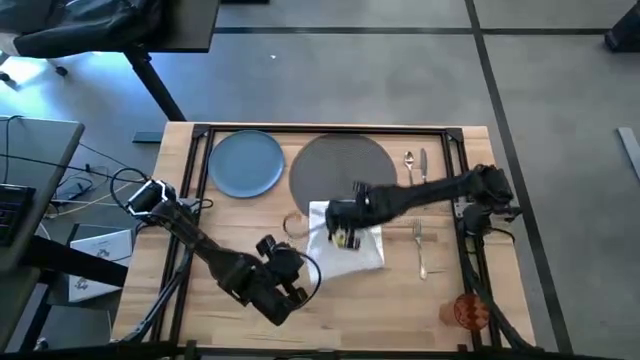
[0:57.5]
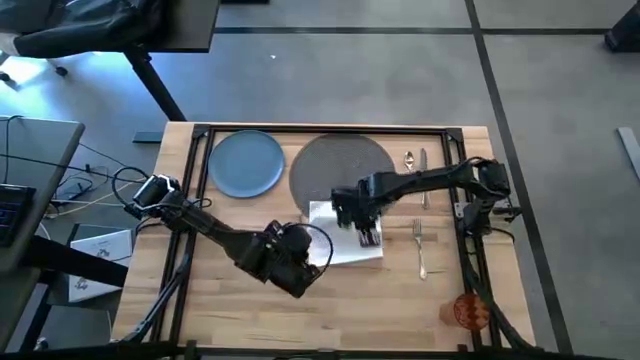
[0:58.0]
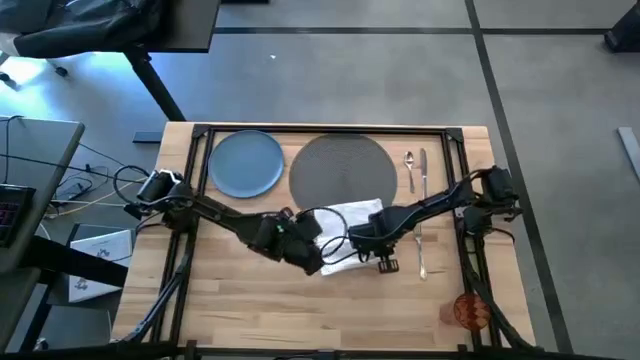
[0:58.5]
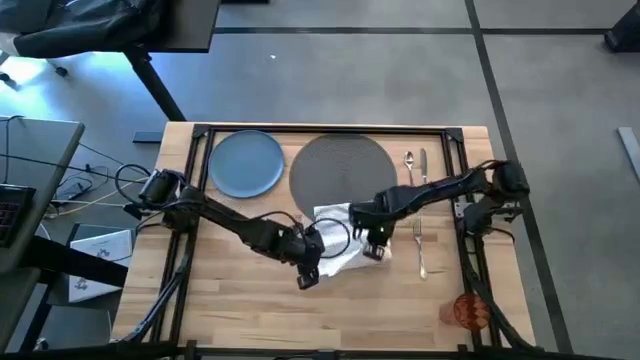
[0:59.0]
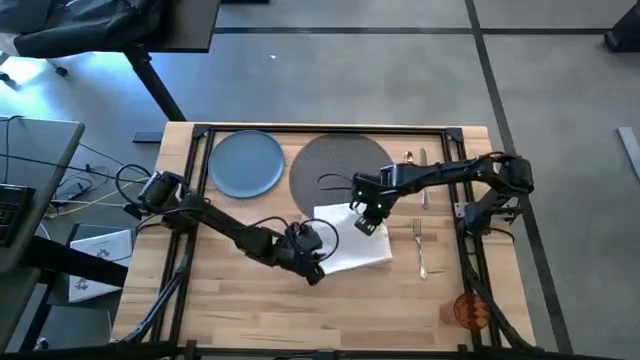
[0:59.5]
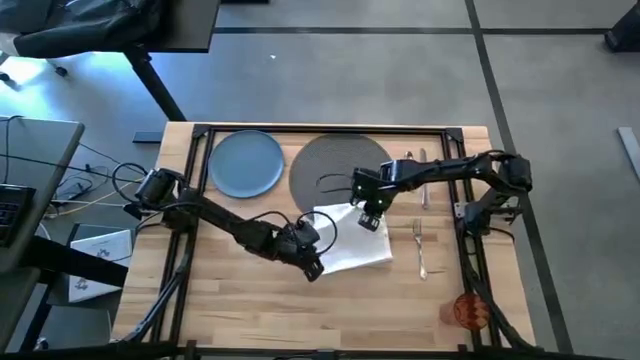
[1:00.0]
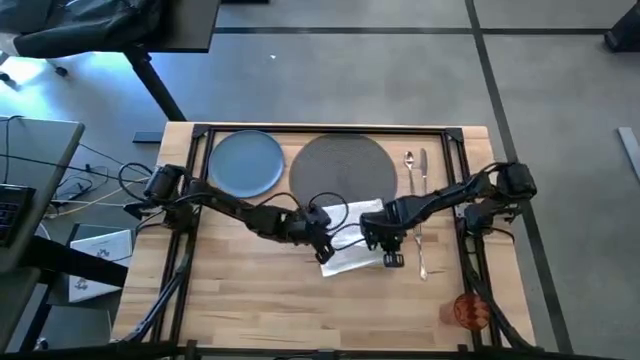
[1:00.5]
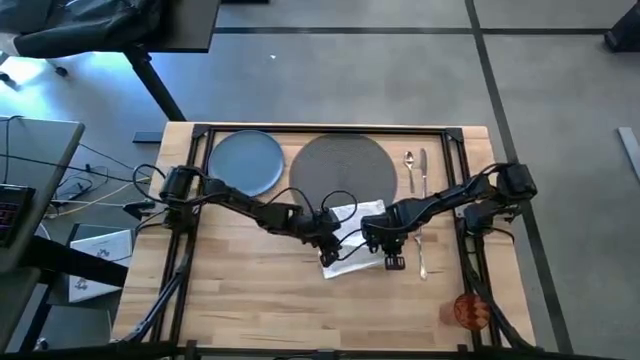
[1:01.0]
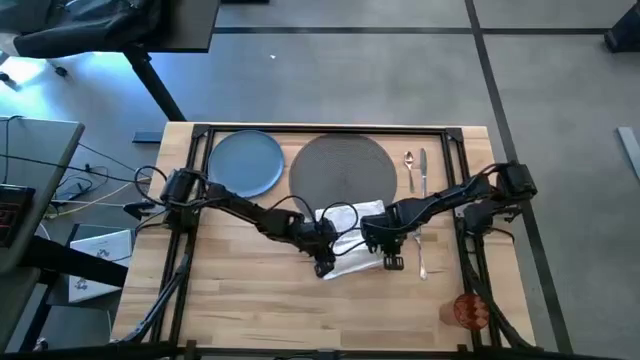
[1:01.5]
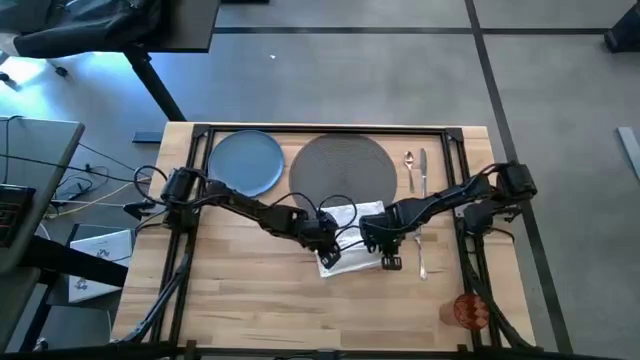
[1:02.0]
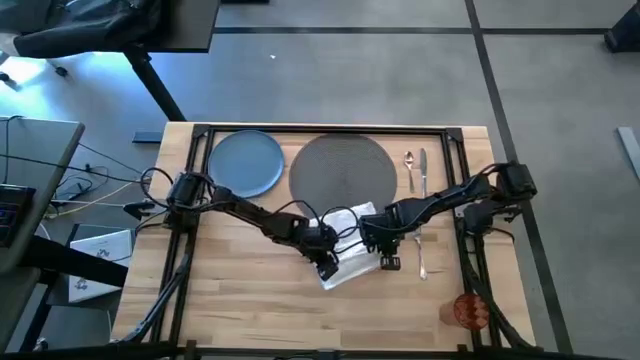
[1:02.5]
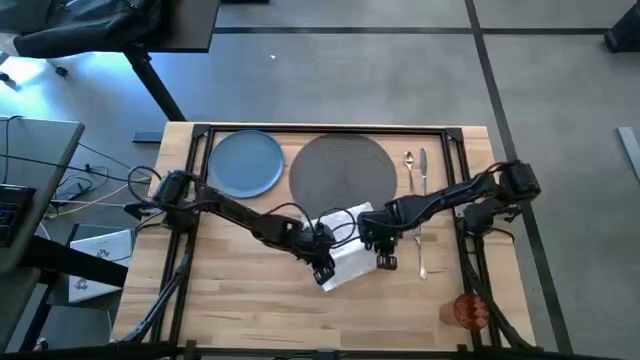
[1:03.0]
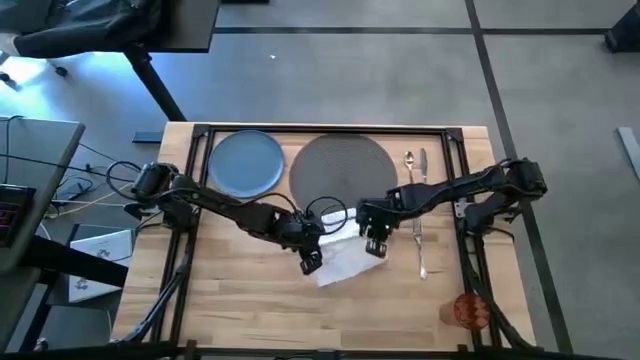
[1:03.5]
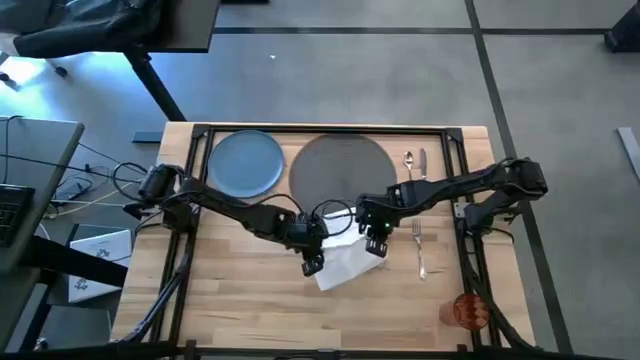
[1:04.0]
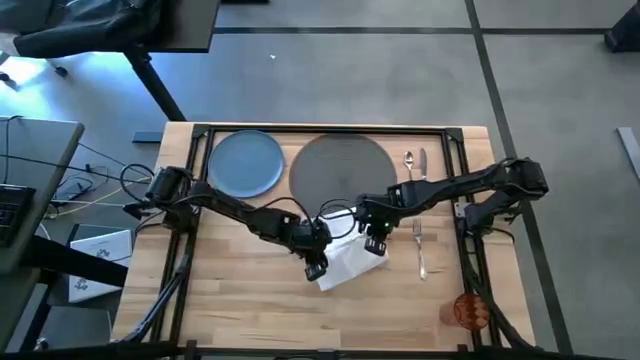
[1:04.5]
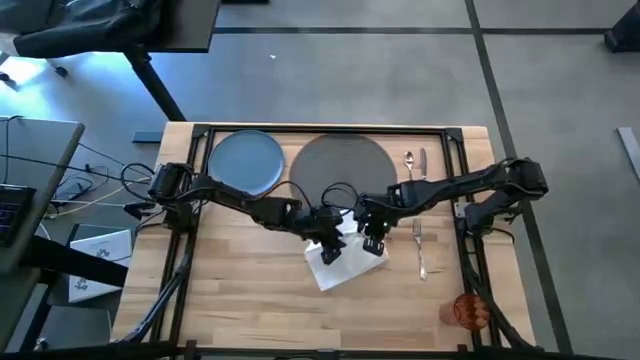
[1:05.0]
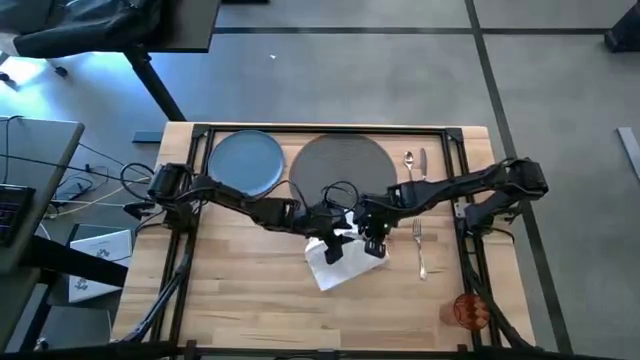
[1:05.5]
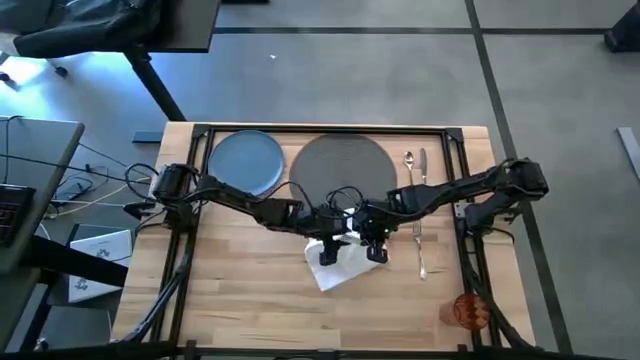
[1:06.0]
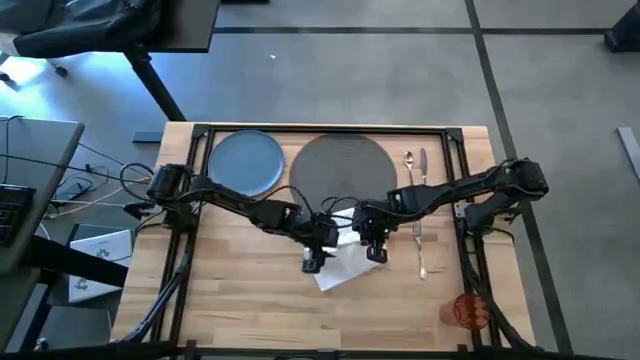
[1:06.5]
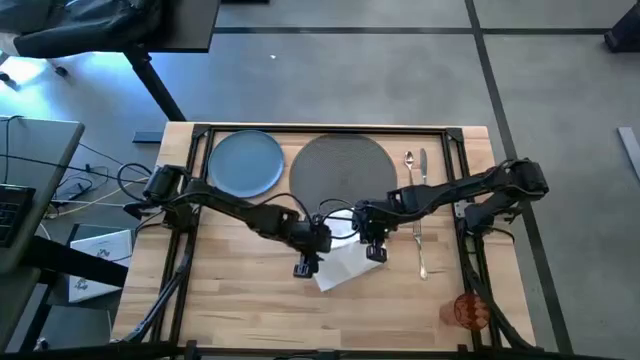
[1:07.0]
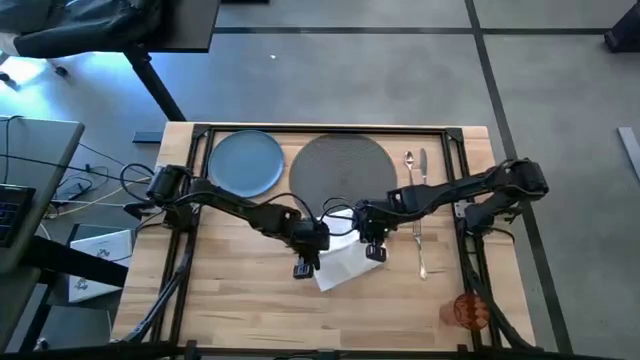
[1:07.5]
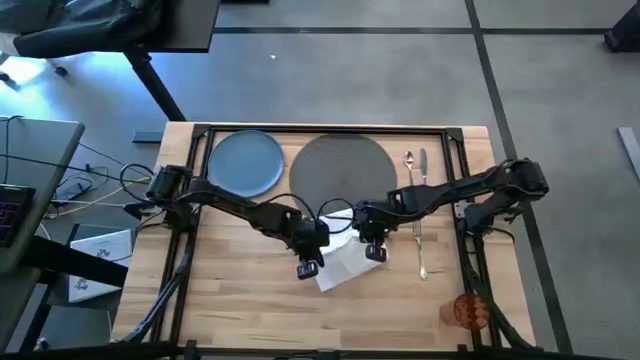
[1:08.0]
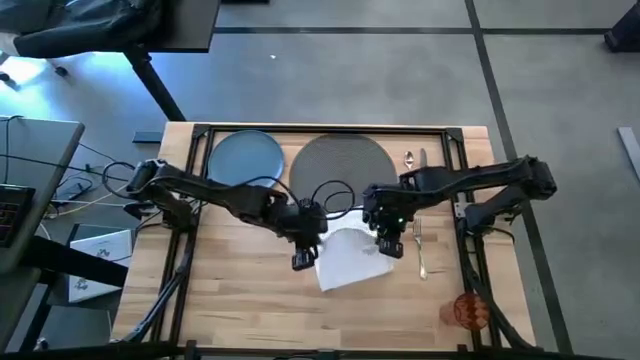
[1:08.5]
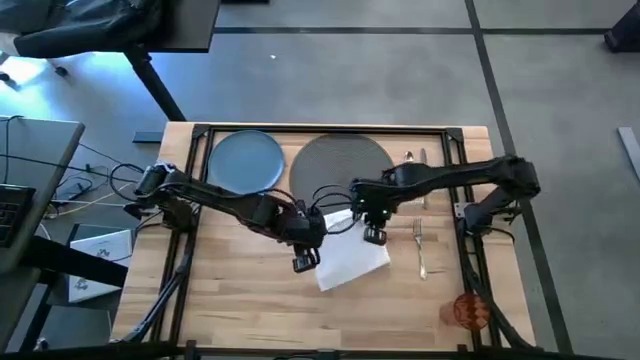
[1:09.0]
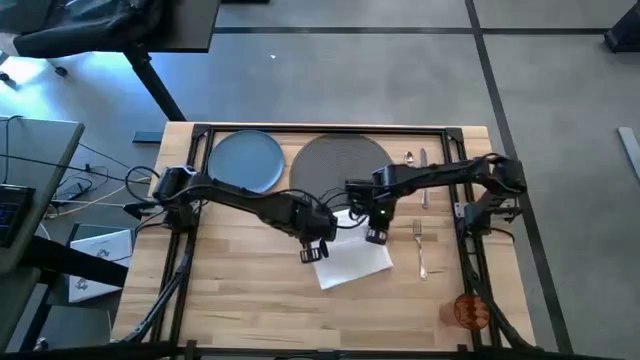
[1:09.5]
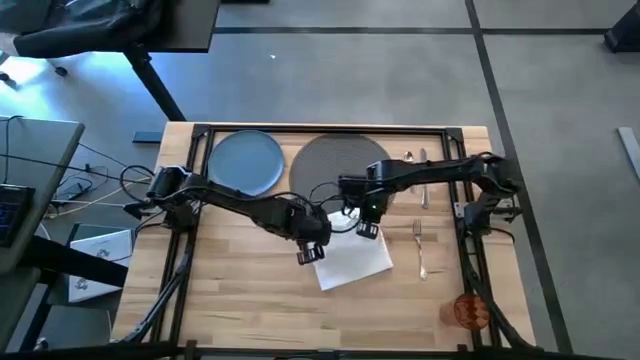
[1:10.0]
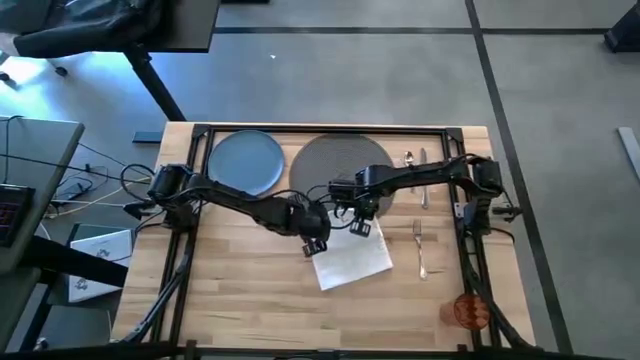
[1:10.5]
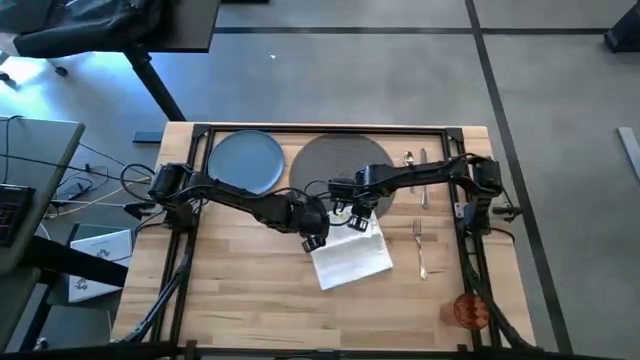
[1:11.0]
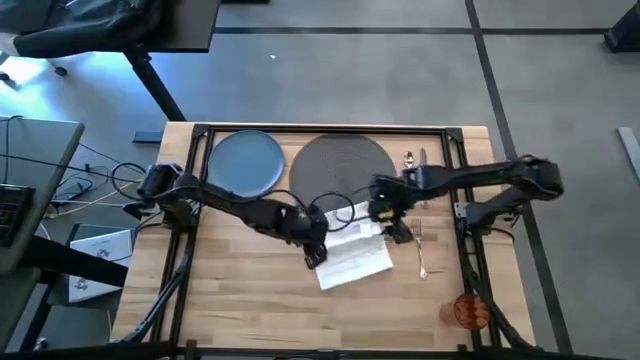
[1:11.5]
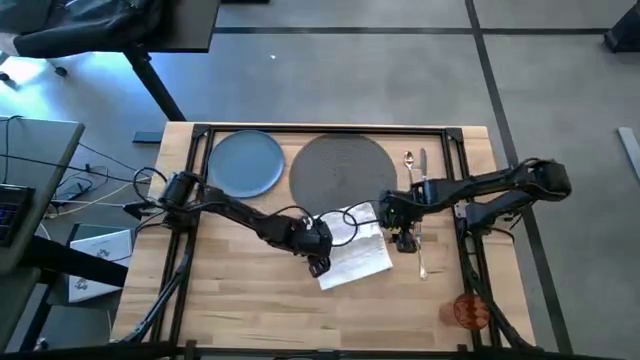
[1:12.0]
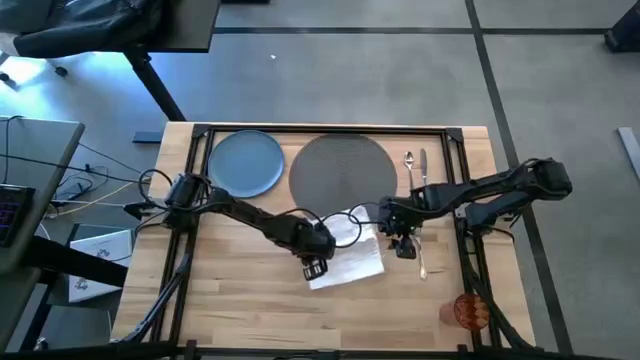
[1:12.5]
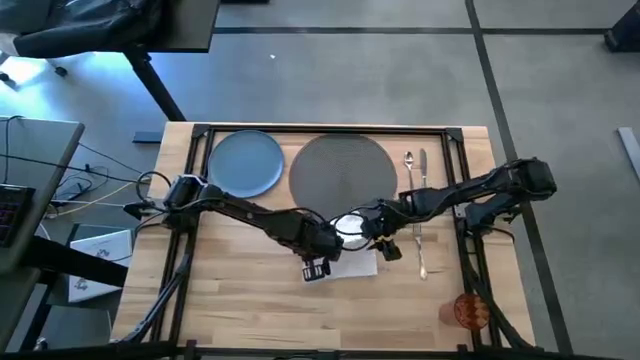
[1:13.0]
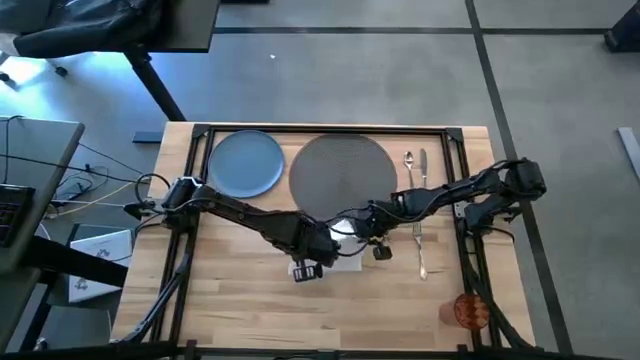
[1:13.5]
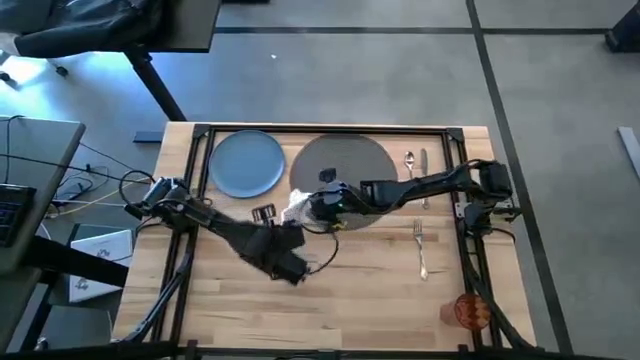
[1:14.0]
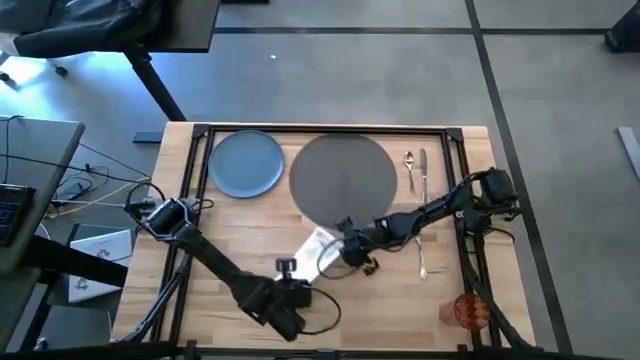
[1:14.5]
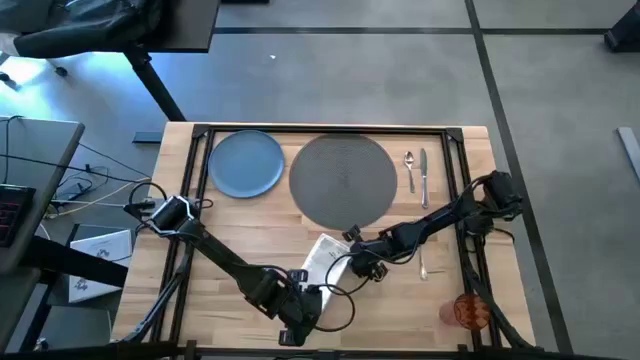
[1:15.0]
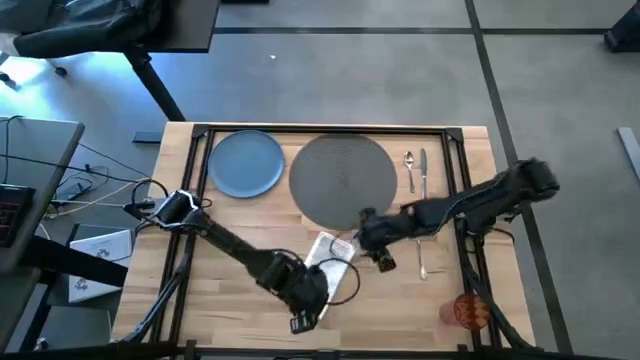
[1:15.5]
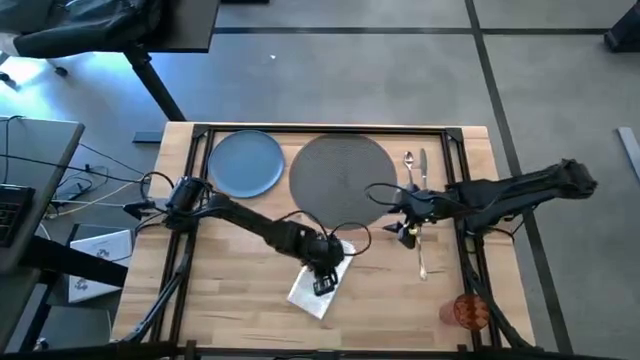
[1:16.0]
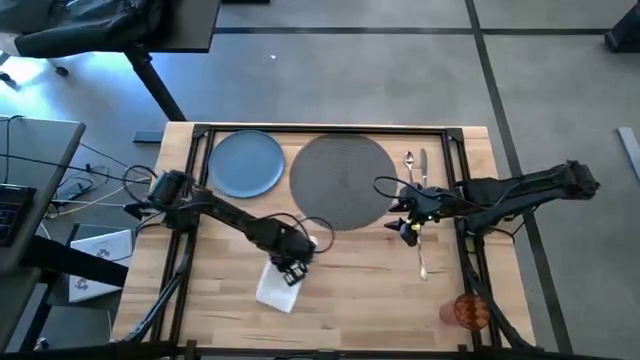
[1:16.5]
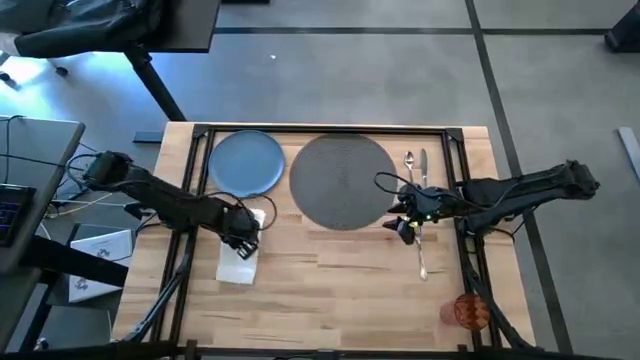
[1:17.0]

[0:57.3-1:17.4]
Task: Set table place
Fold the white table napkin

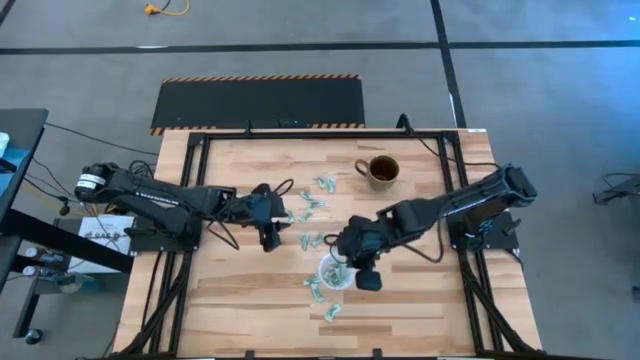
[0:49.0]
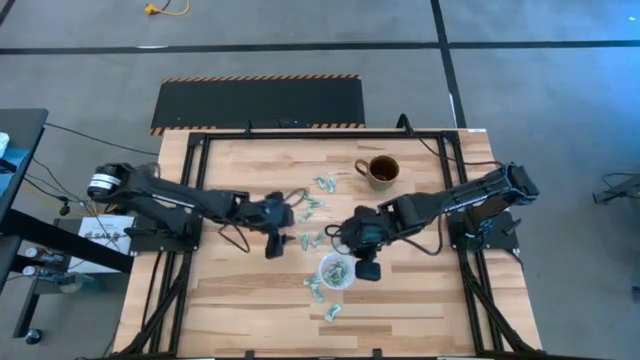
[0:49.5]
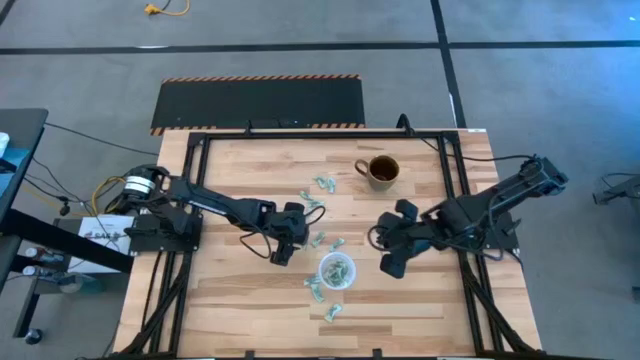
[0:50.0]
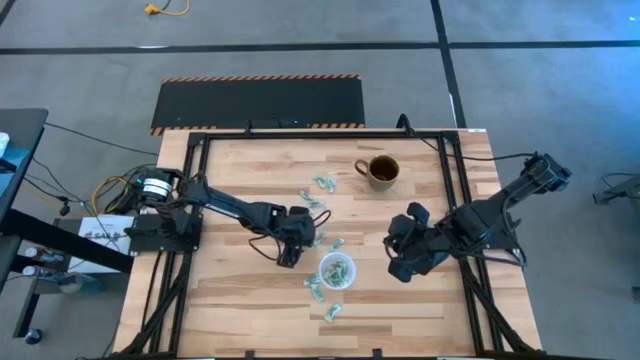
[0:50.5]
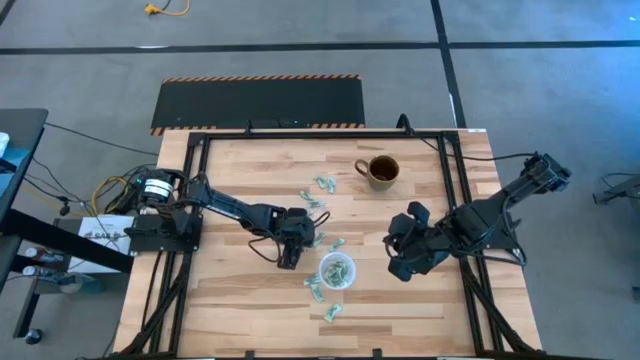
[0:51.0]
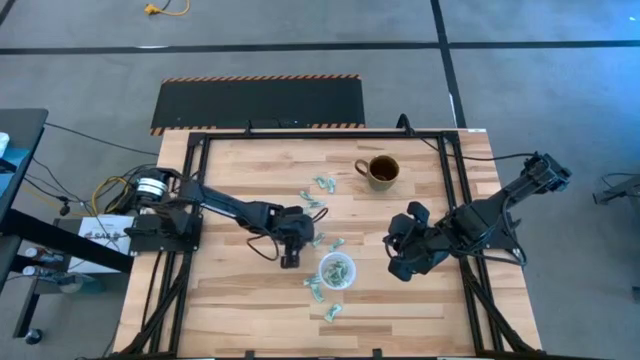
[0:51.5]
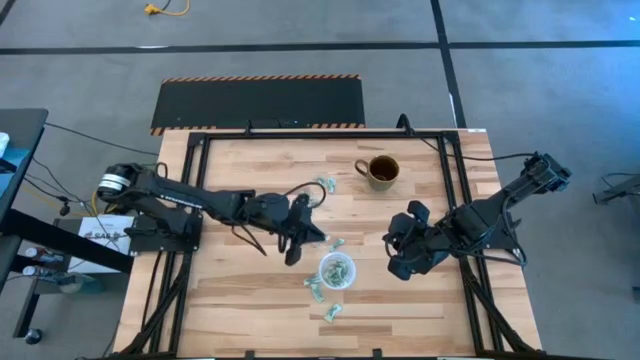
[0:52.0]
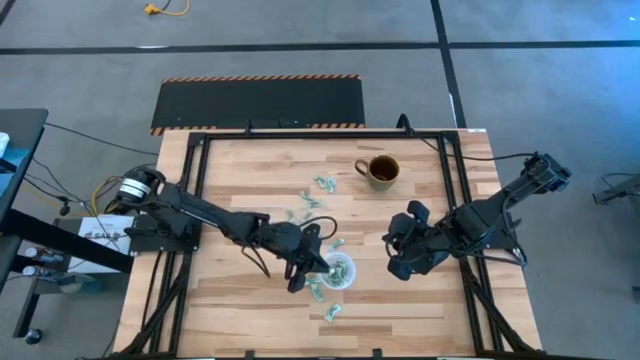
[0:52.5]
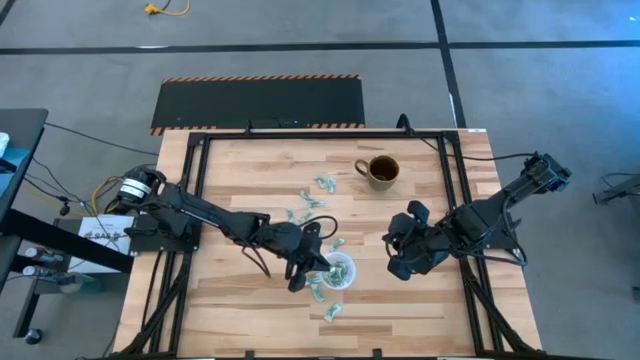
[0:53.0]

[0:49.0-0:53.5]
Task: Pick and place Stevia / Truvia into bins
Put the green stevia packet into the transparent container
